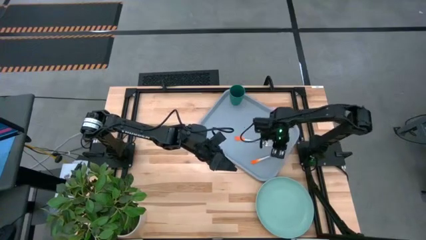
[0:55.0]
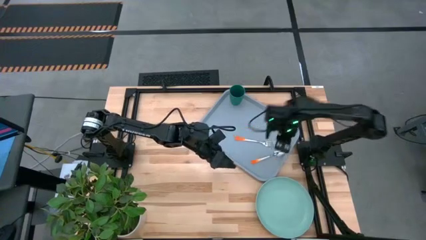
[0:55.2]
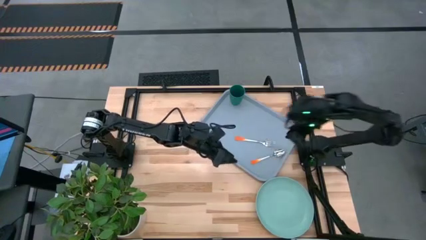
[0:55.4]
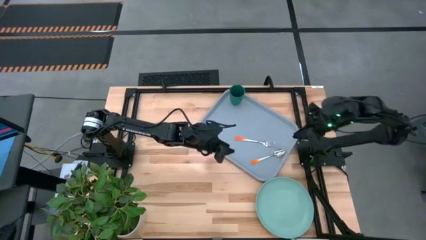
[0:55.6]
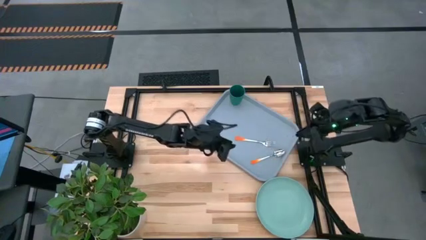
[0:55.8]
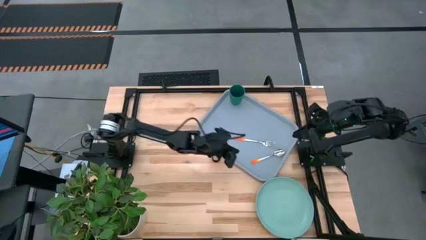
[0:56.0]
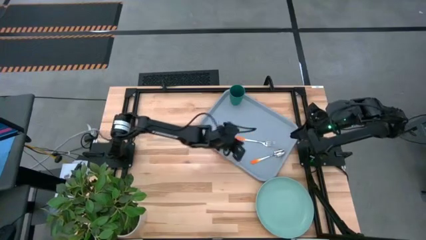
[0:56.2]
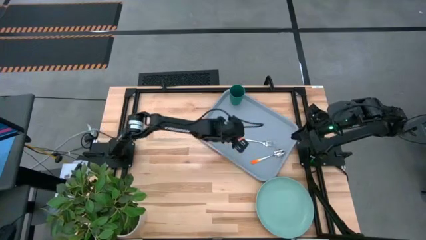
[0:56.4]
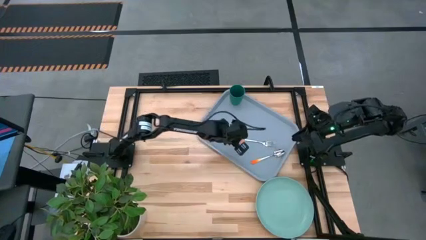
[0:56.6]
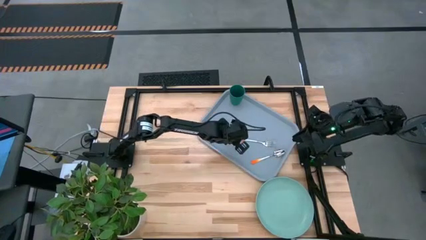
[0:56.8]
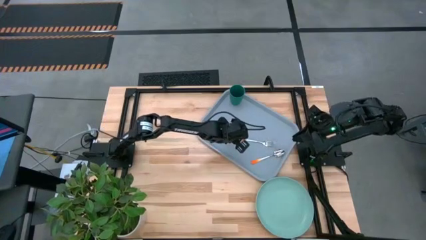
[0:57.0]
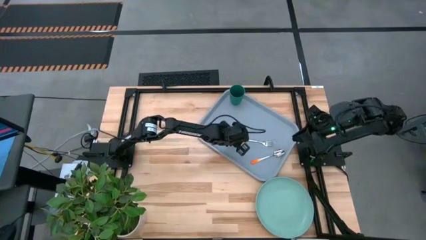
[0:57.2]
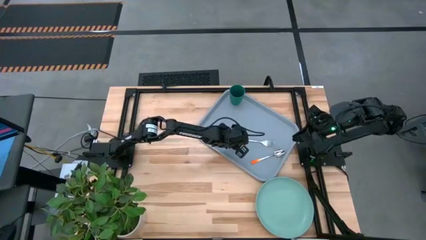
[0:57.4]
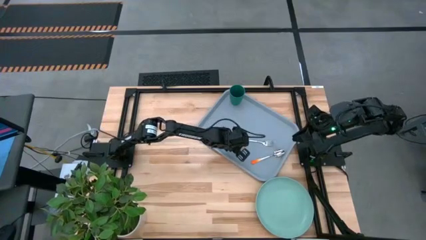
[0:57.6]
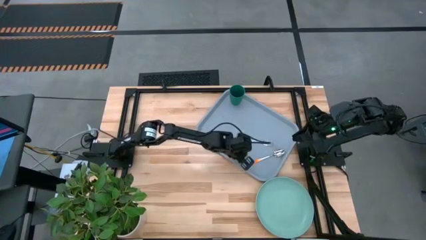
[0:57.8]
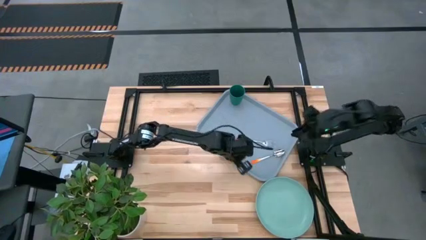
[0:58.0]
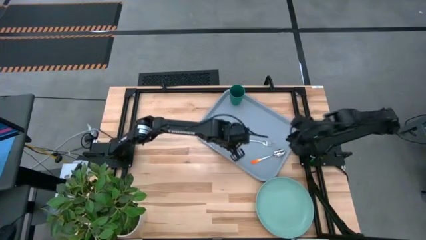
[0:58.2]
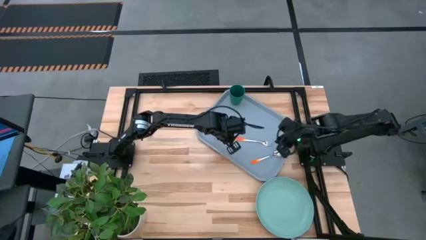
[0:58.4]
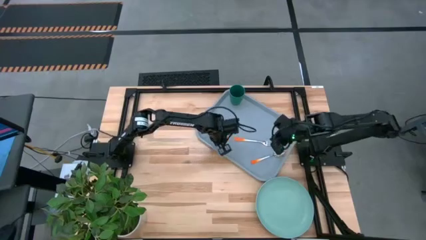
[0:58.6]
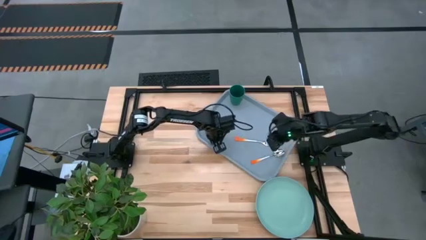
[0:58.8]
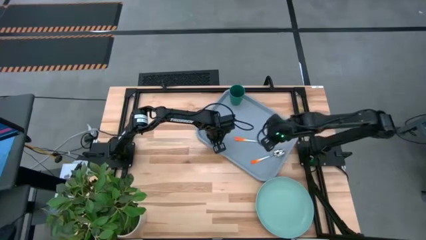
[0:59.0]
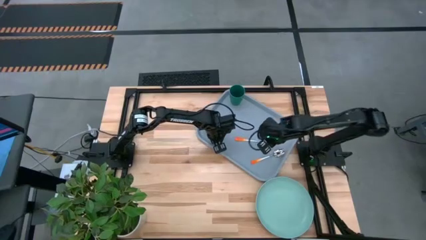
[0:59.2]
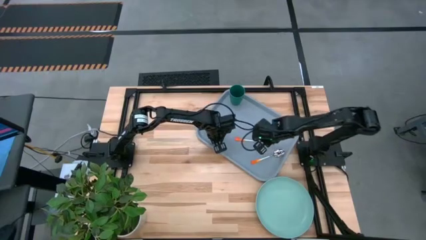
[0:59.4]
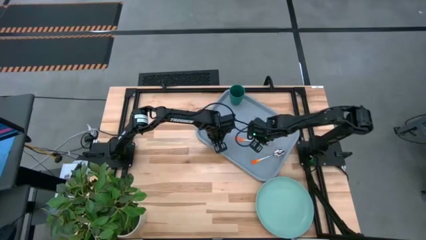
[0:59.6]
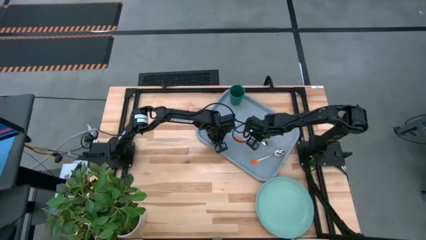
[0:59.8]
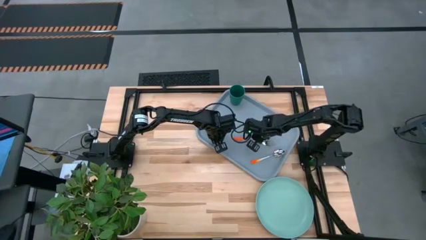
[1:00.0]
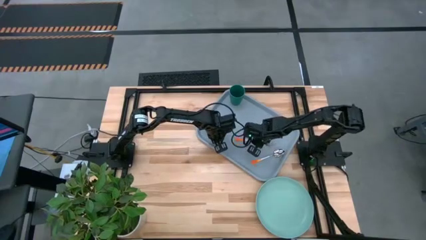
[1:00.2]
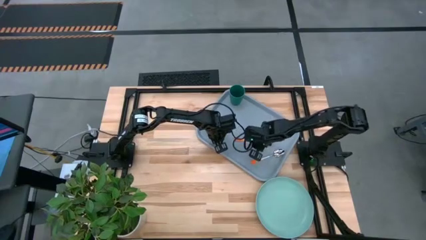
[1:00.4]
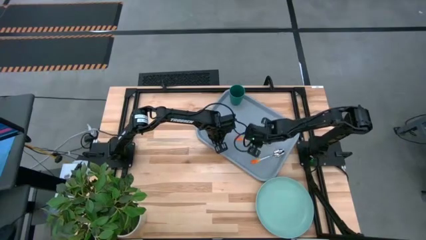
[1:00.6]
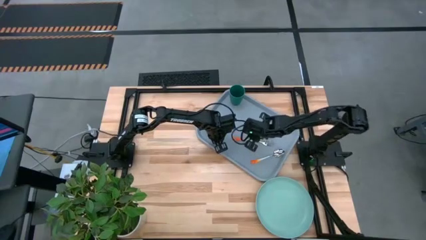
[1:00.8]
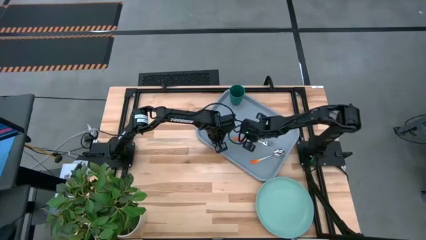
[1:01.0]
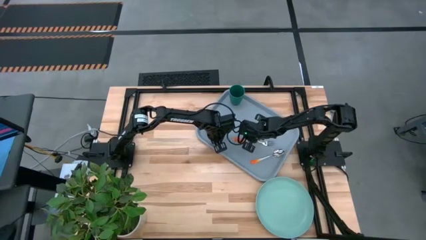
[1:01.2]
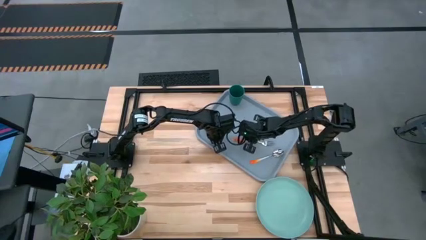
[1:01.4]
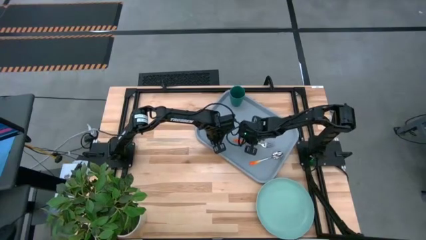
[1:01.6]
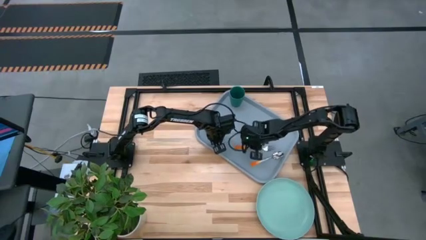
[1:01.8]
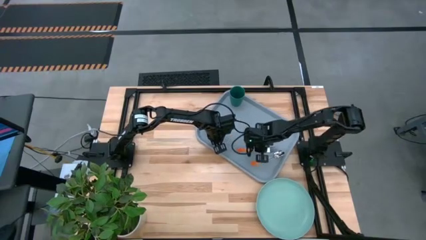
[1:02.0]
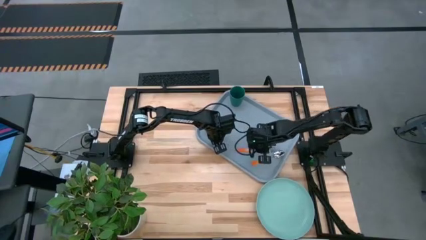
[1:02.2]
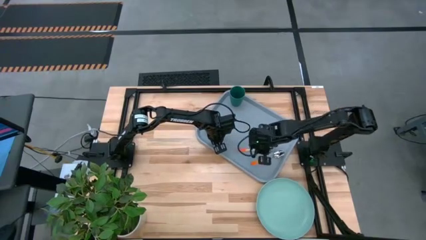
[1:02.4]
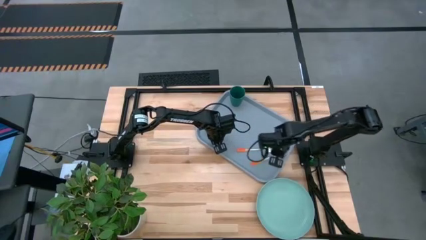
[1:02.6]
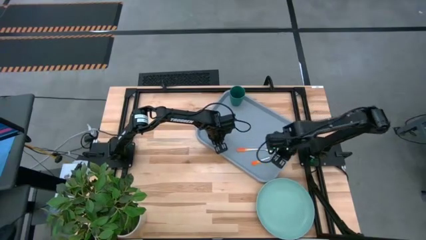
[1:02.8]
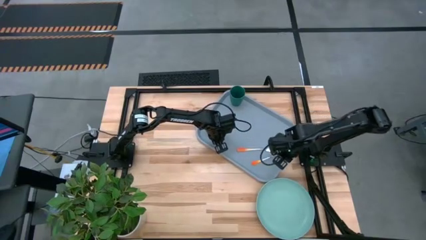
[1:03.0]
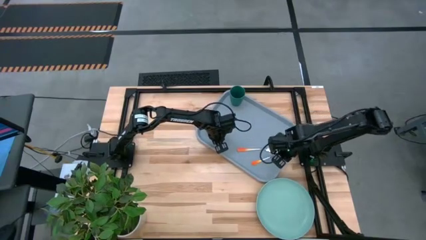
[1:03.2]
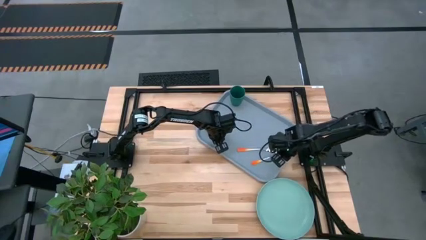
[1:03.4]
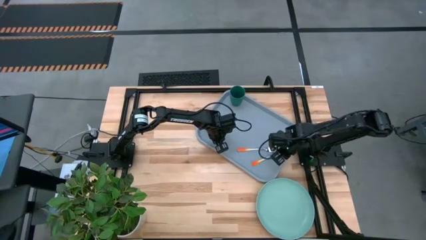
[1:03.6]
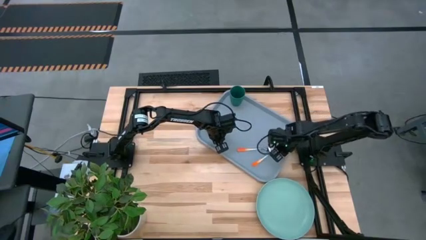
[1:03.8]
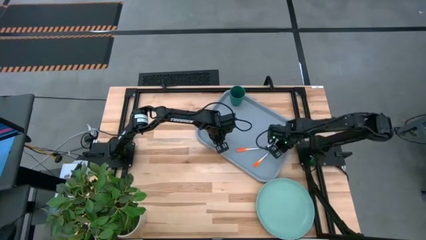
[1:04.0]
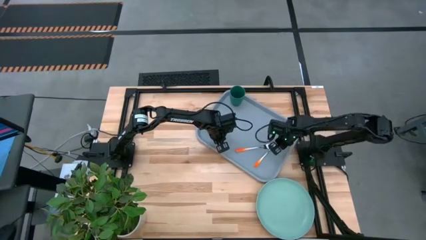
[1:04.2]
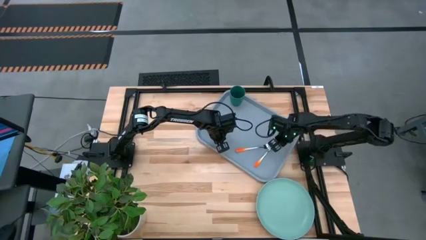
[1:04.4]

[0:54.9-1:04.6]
Task: Pick and place plate/cup/fork/spoon on tray
Adjust the silverware

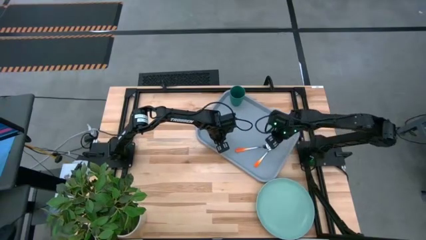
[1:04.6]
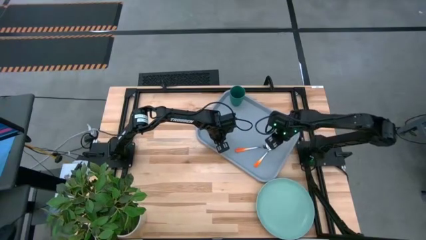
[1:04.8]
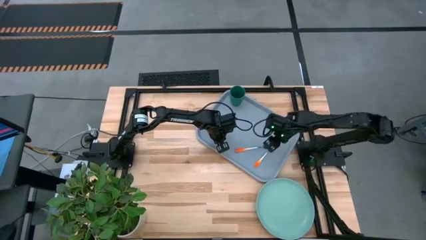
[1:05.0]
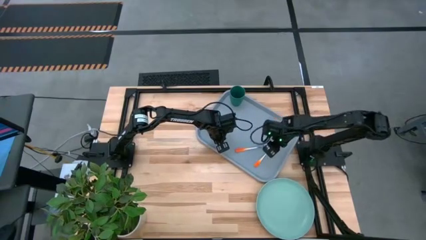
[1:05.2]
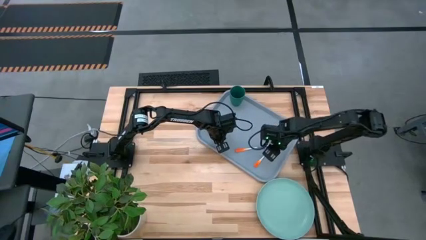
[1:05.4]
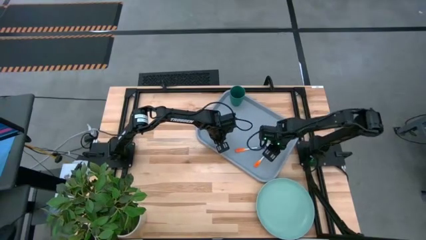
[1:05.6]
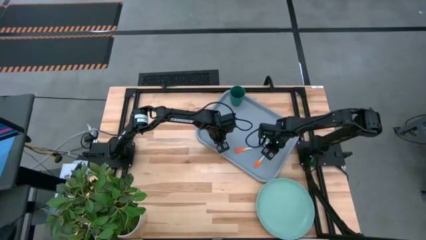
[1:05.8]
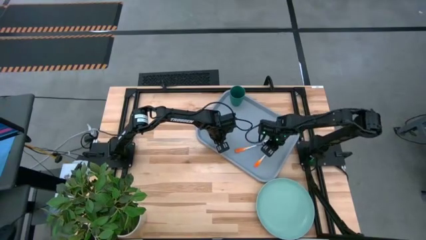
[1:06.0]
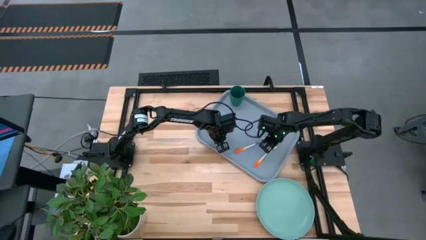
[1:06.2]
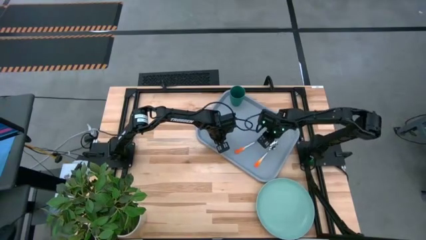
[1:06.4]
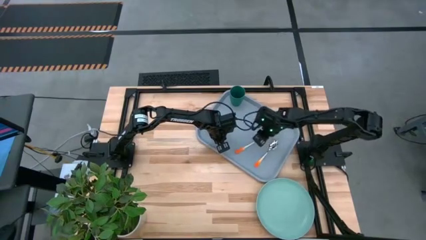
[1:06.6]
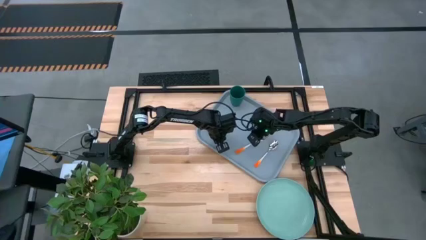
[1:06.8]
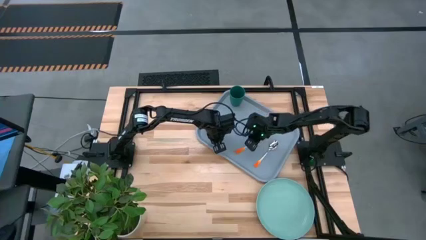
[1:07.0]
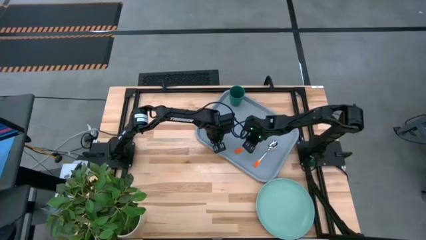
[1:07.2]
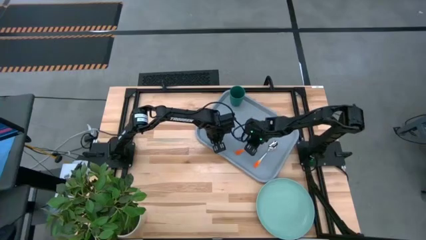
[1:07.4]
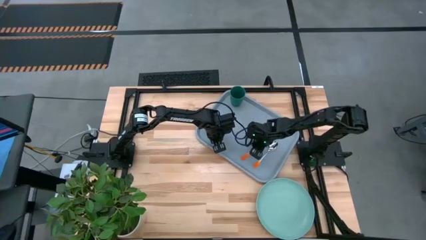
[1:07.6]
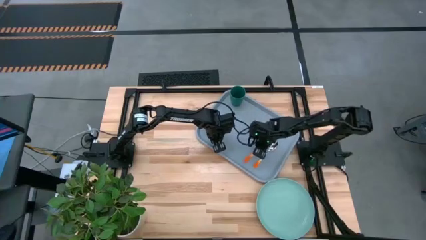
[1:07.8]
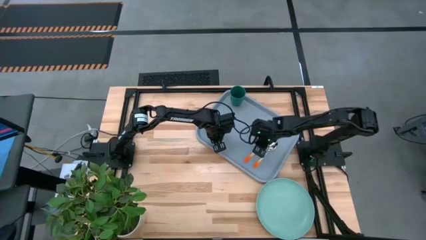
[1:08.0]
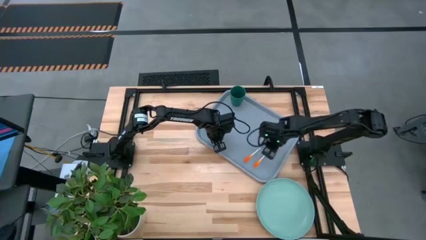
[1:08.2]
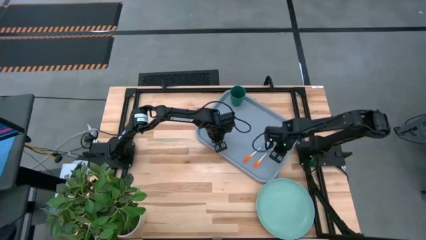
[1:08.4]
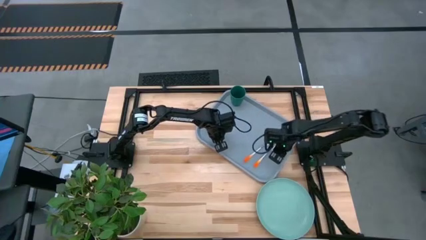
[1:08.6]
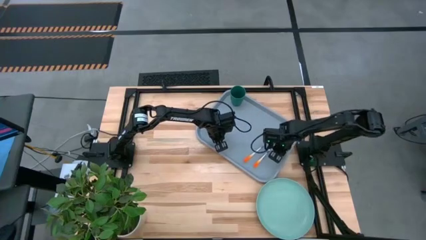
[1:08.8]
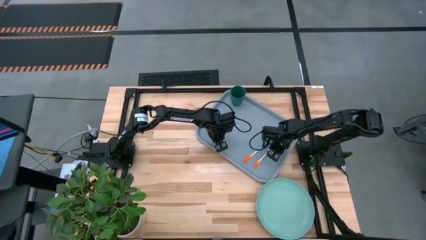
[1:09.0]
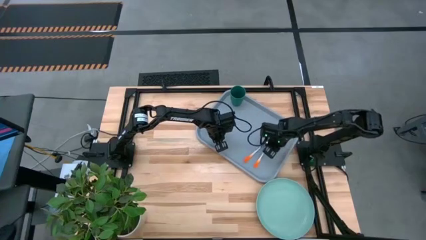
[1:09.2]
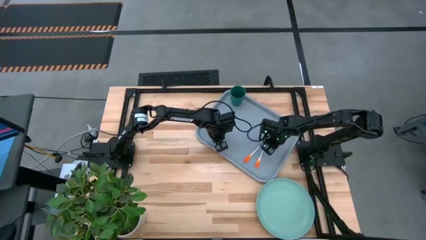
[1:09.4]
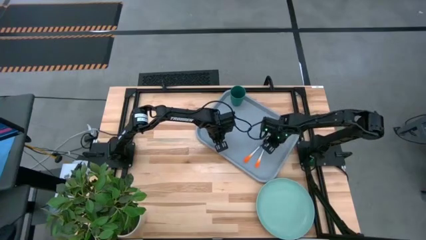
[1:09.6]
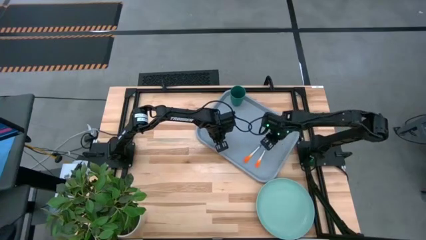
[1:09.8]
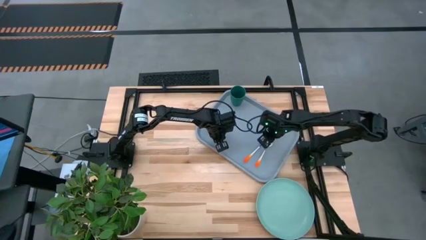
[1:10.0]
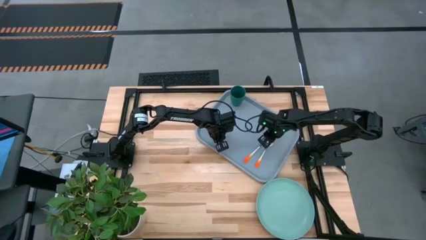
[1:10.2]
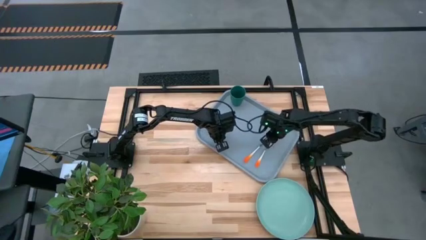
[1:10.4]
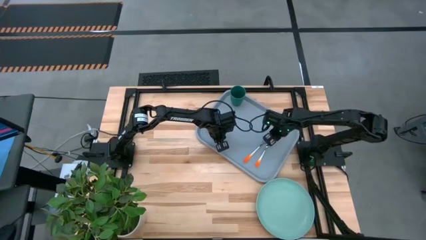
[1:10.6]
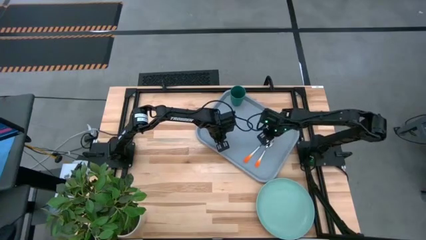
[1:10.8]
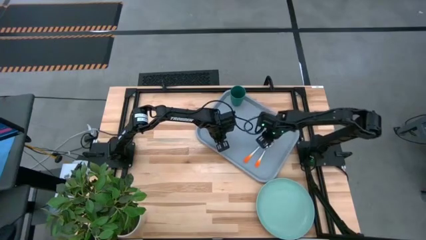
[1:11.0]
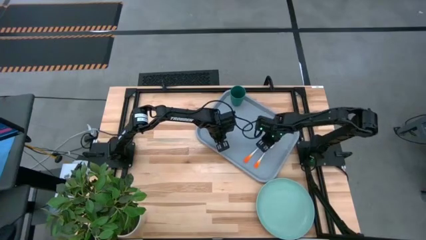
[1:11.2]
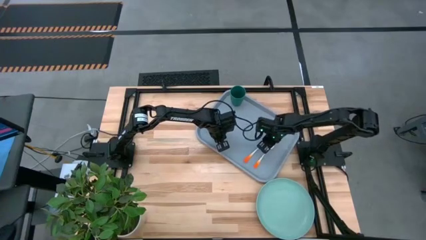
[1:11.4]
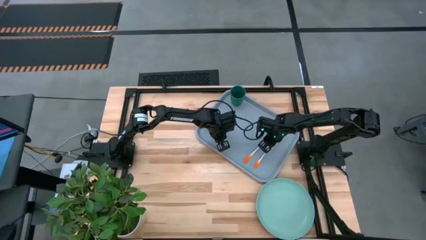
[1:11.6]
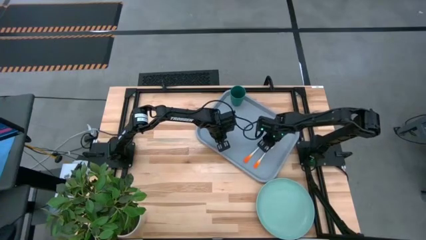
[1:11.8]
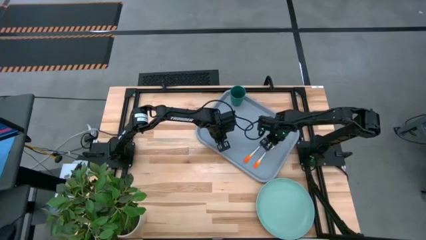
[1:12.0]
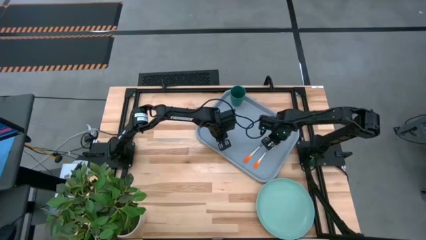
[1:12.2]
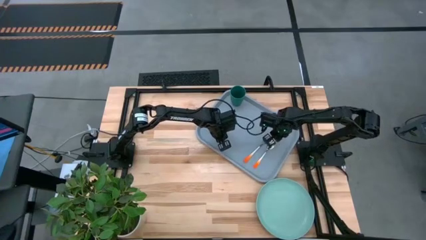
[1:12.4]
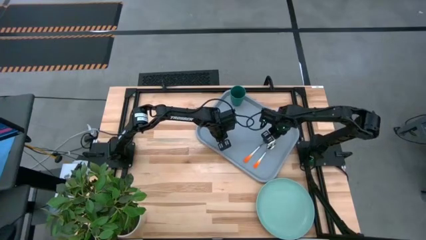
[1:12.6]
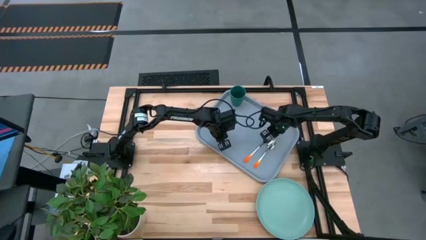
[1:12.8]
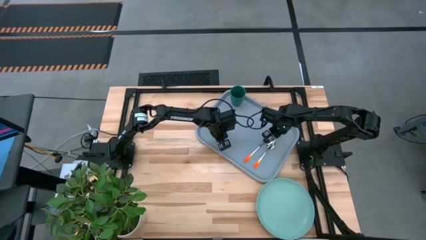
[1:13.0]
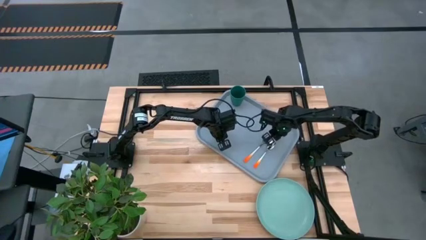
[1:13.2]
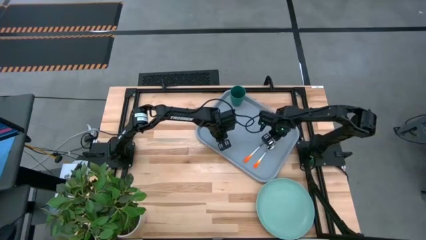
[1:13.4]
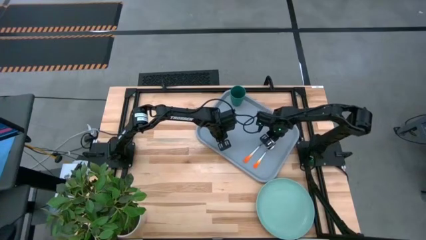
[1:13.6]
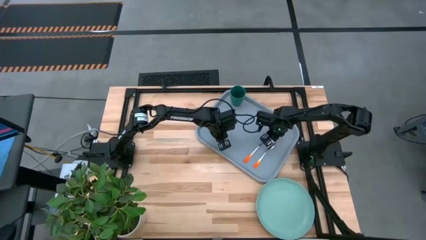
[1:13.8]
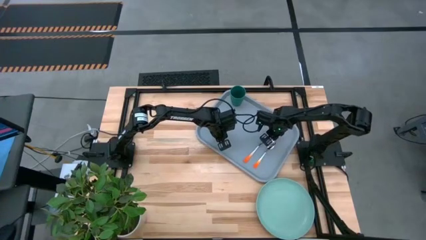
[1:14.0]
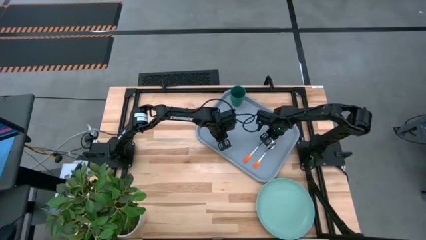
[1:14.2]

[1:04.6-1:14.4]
Adjust the silverware
